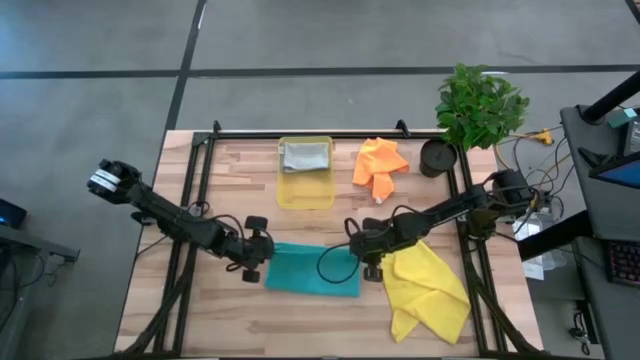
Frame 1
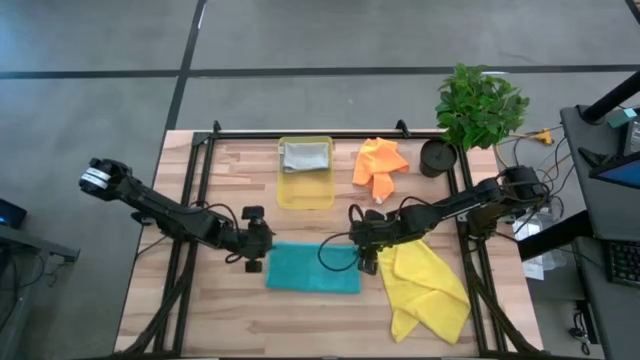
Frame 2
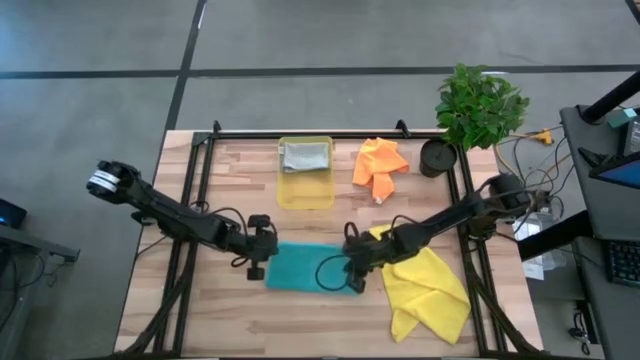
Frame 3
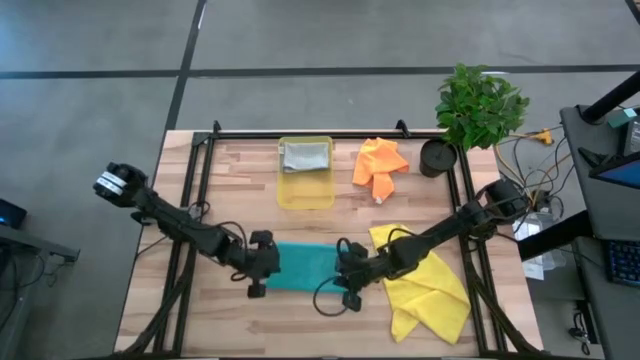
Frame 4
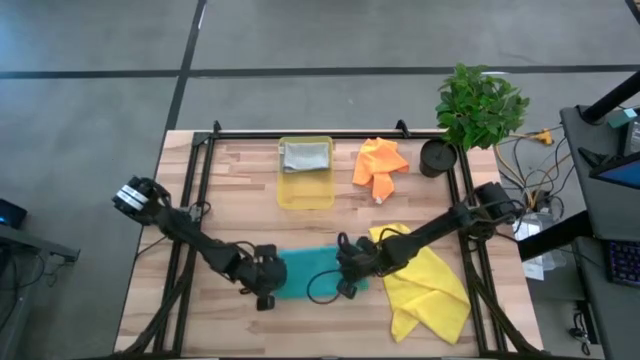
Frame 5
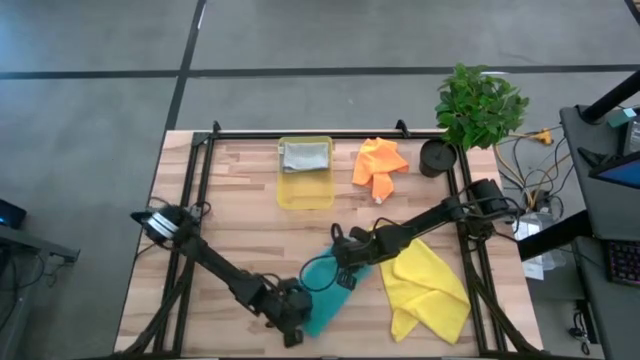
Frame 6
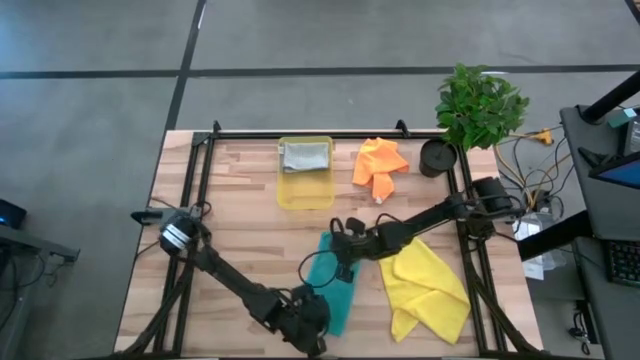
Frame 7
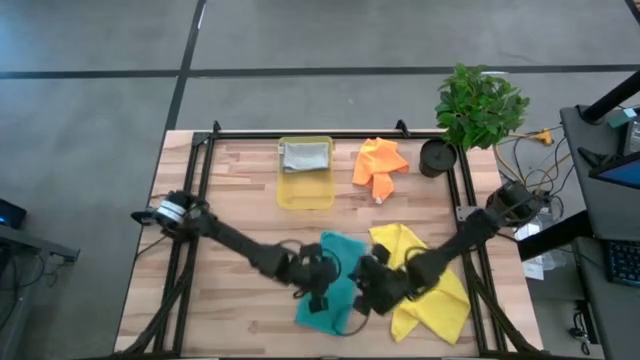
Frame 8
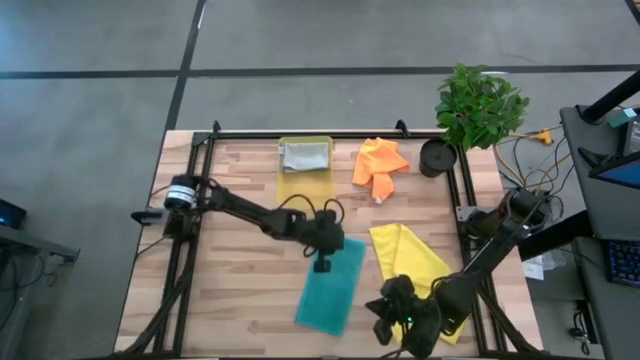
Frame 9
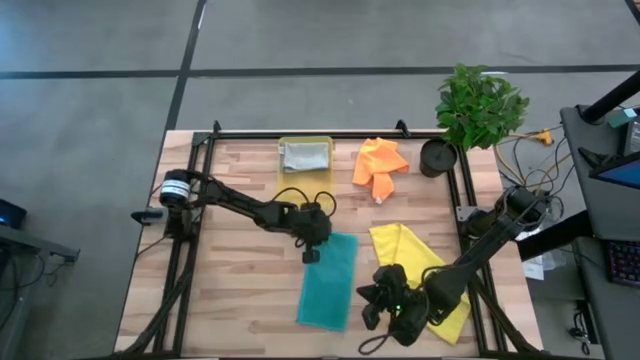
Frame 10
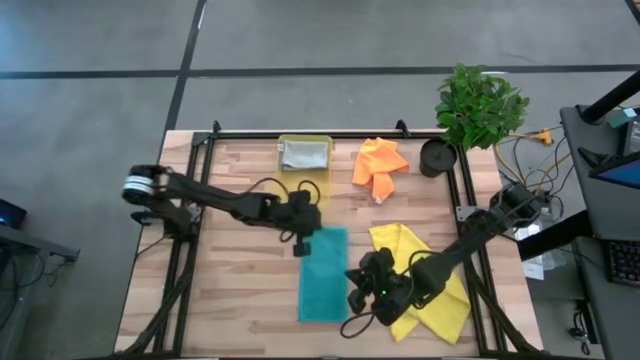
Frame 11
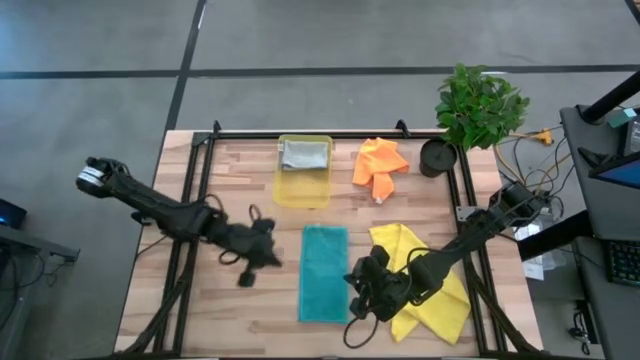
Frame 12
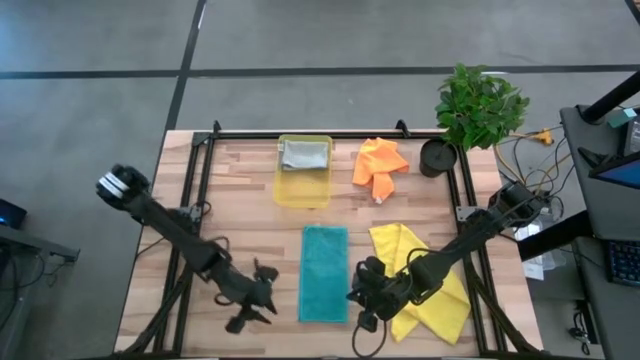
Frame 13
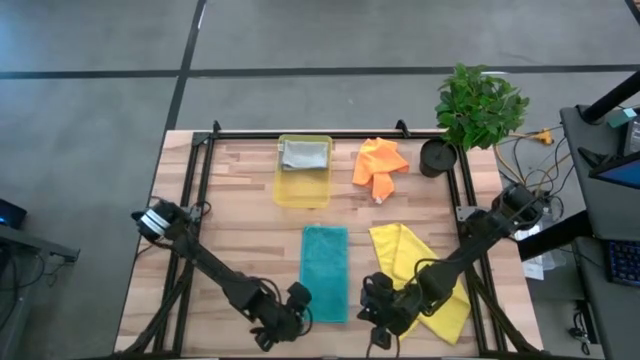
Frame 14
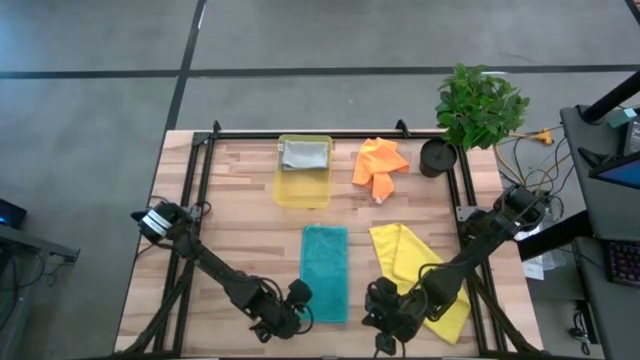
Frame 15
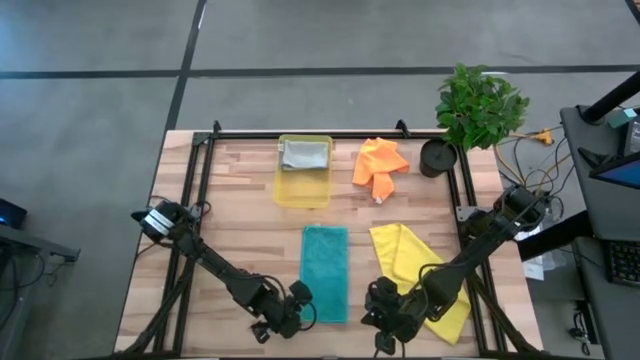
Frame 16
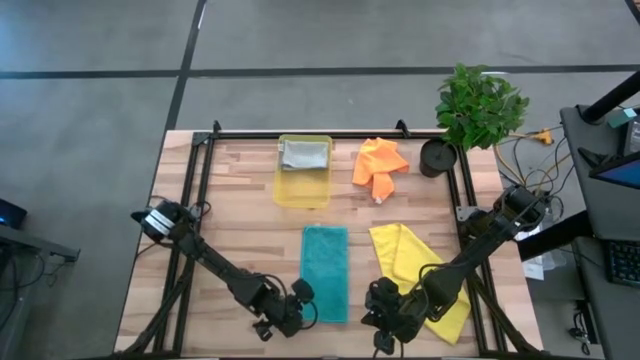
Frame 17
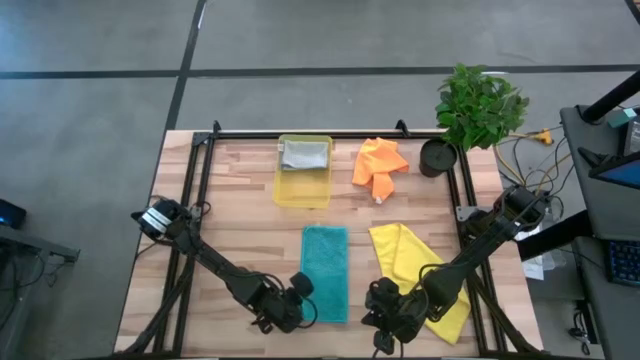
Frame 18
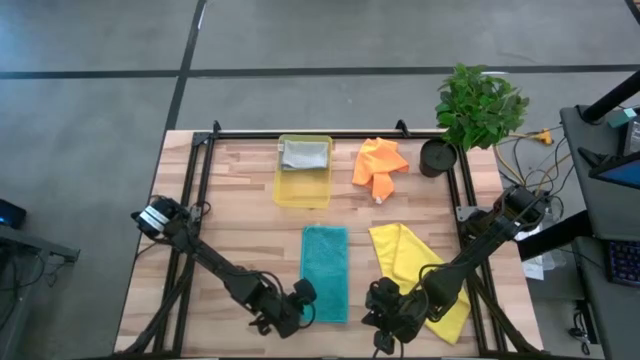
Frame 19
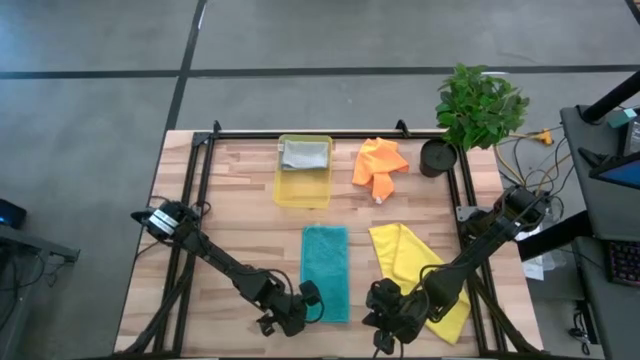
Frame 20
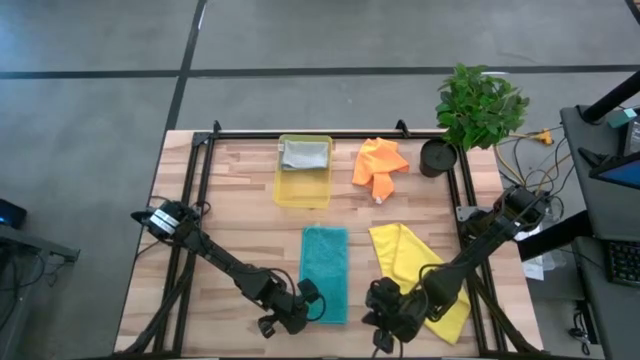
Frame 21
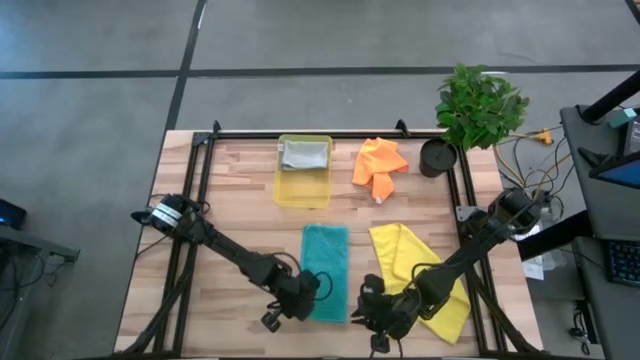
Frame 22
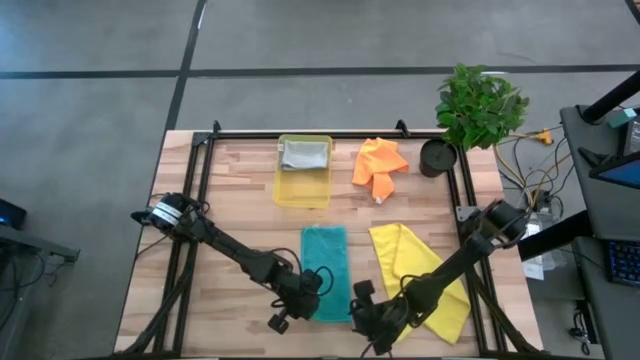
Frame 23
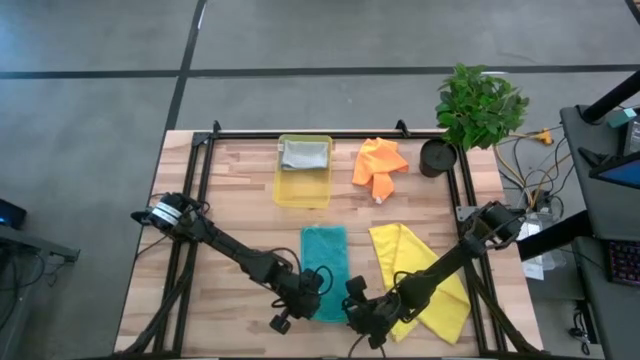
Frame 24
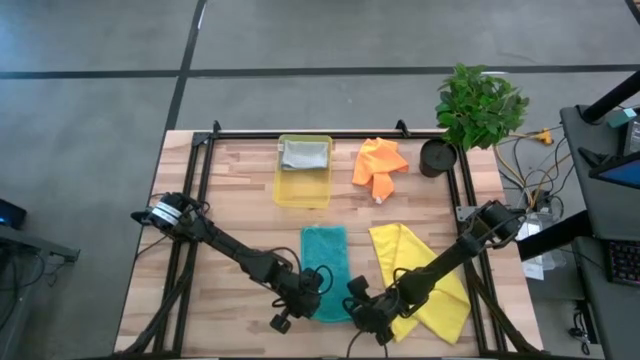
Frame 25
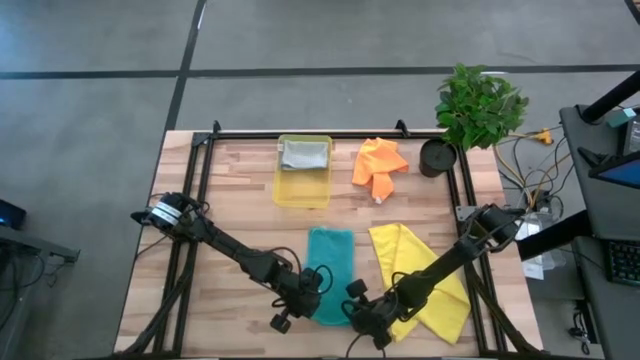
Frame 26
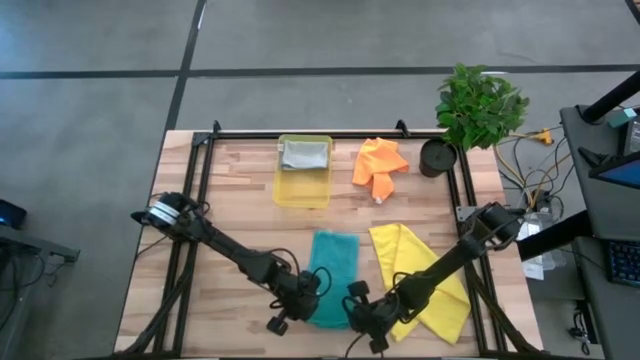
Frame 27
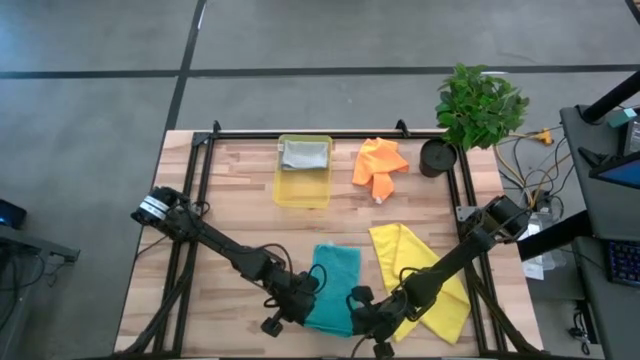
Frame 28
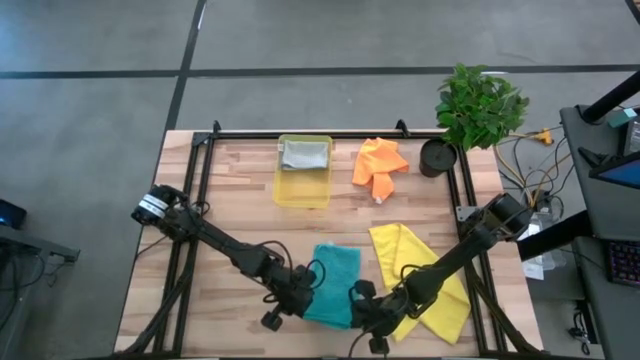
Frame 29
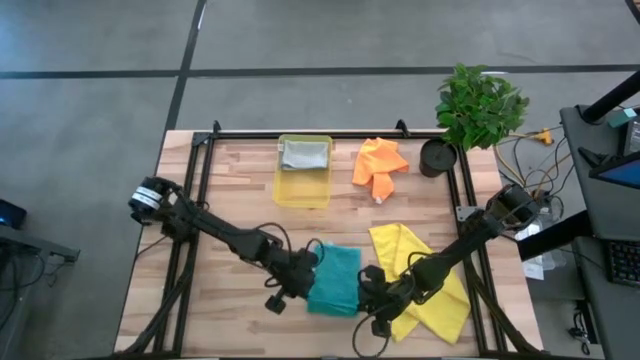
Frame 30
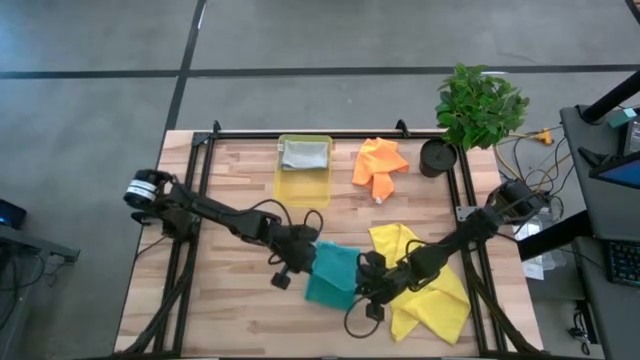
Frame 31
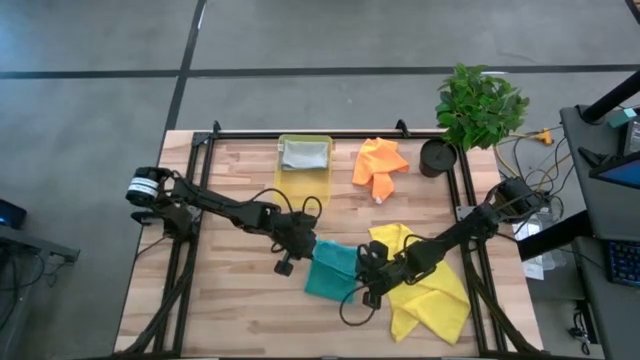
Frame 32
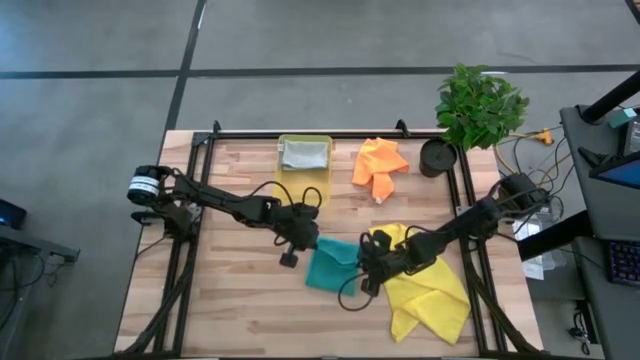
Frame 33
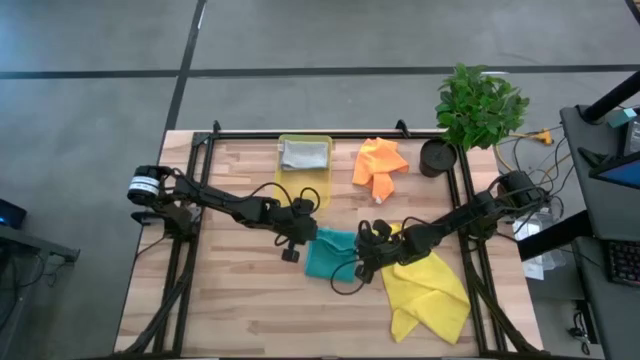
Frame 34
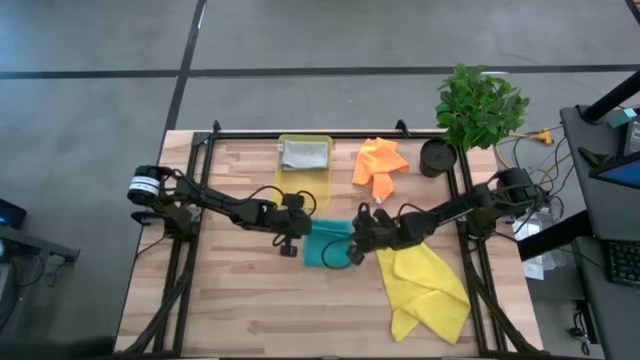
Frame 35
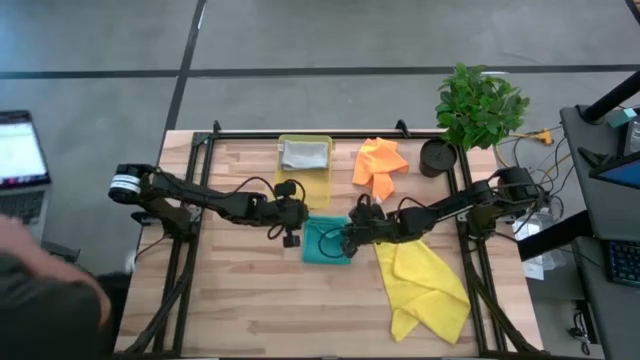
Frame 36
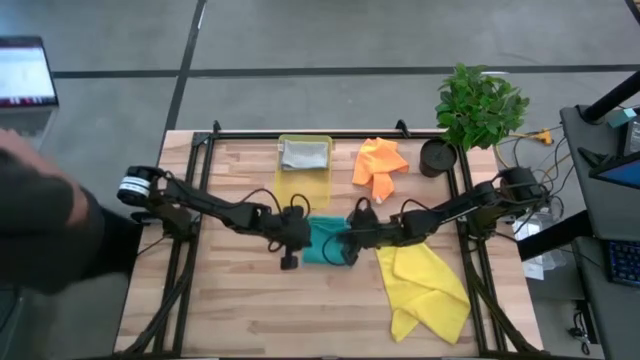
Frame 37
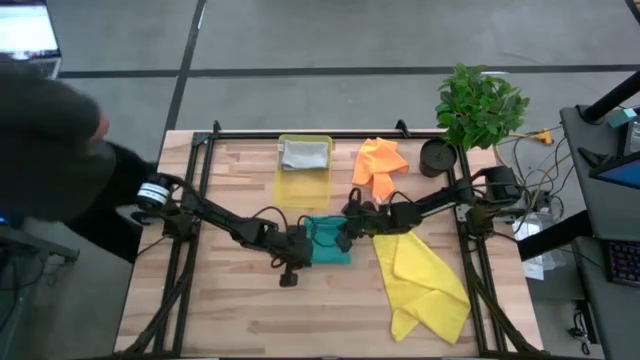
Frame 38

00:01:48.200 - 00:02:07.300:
Task: Fold microfiber towels
Fold the light blue microfiber cloth
